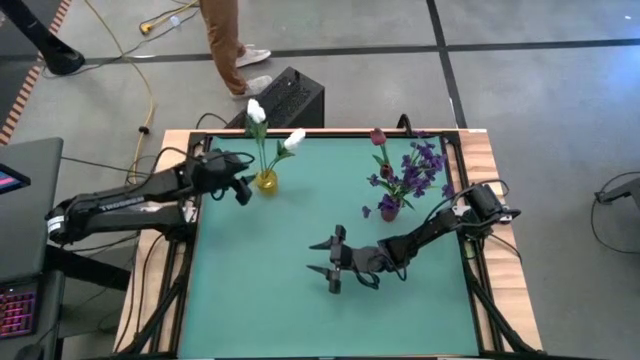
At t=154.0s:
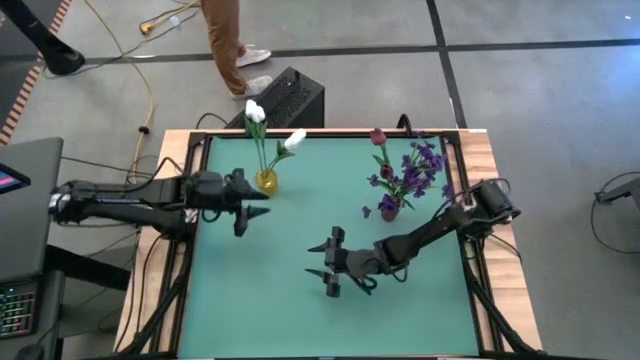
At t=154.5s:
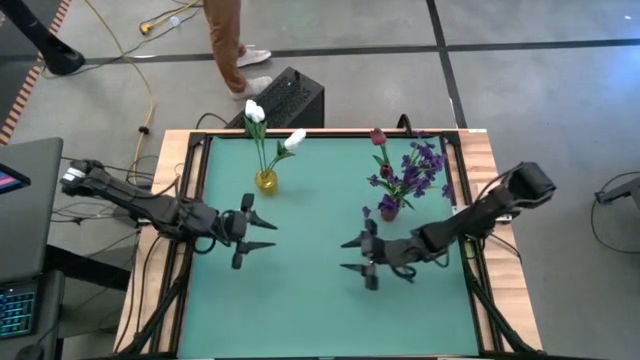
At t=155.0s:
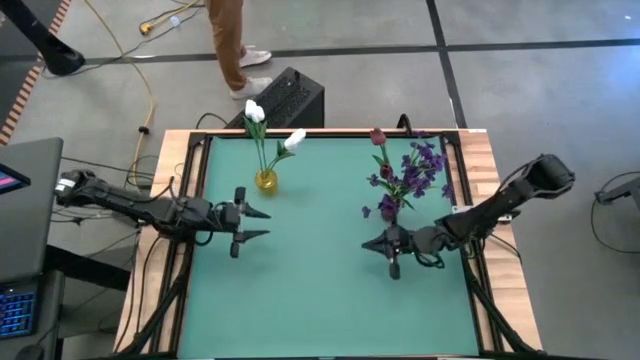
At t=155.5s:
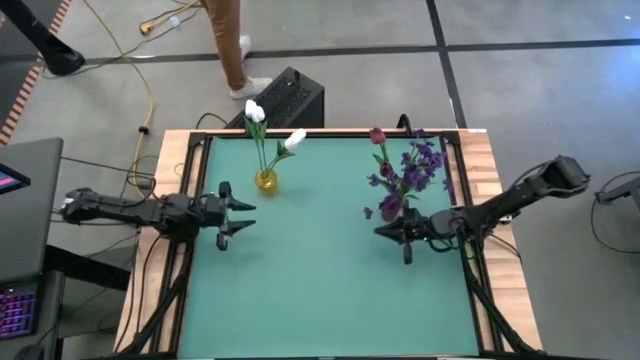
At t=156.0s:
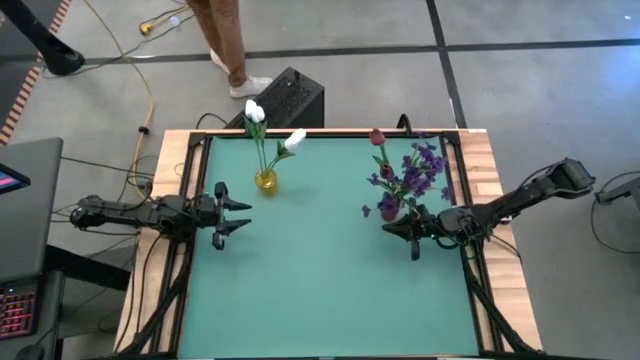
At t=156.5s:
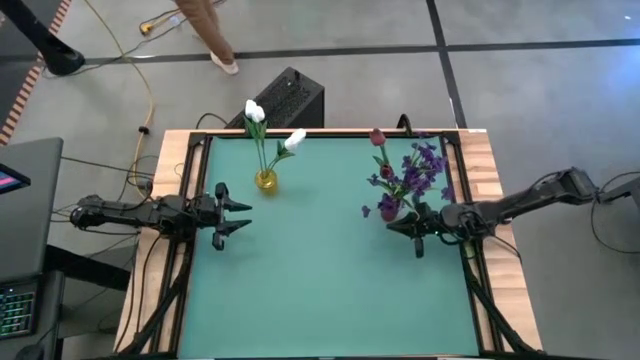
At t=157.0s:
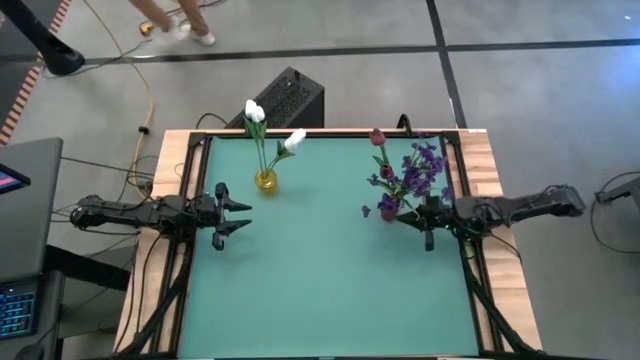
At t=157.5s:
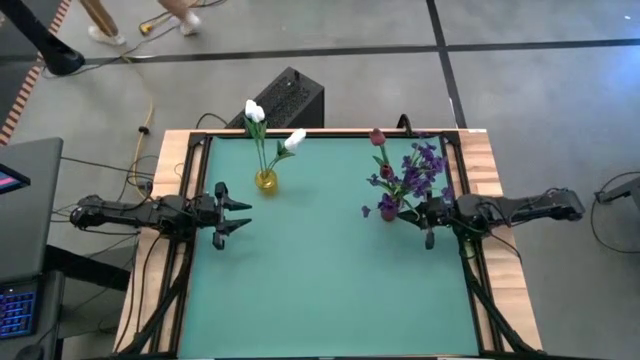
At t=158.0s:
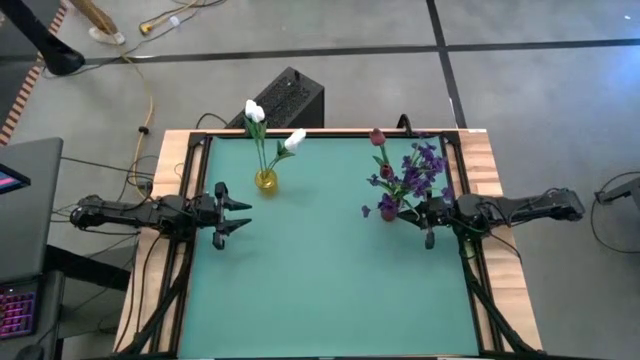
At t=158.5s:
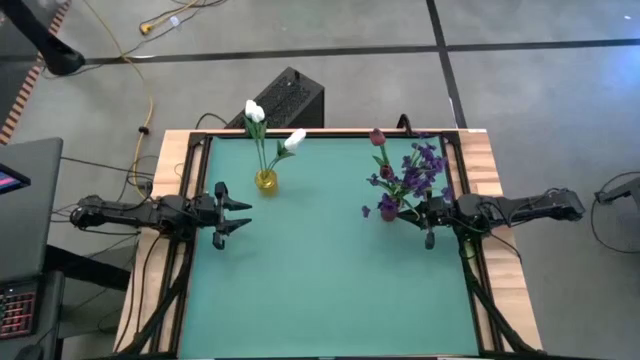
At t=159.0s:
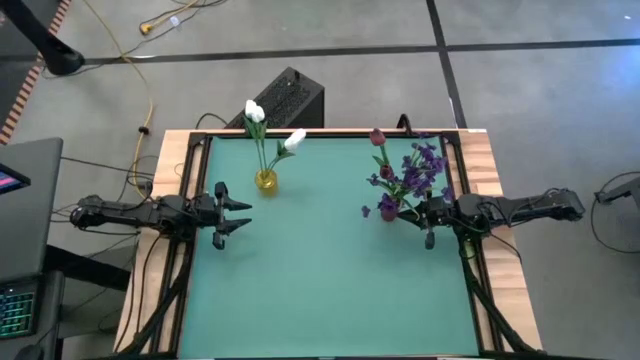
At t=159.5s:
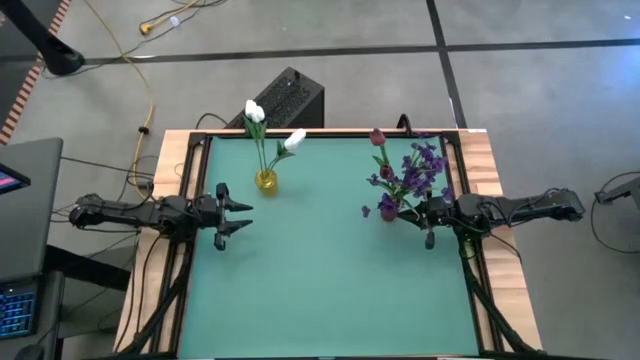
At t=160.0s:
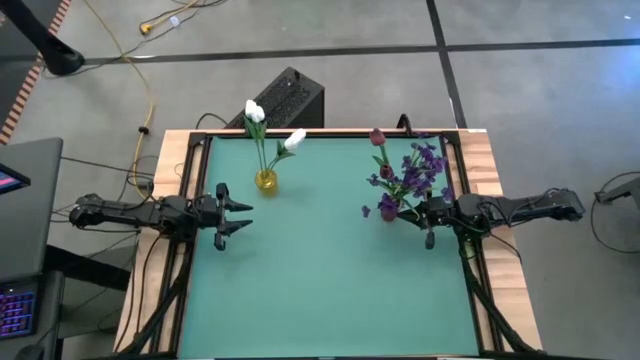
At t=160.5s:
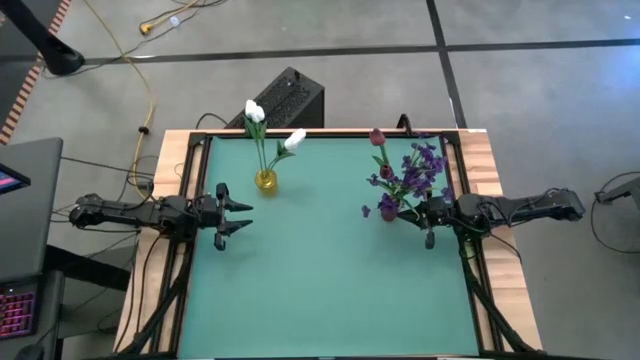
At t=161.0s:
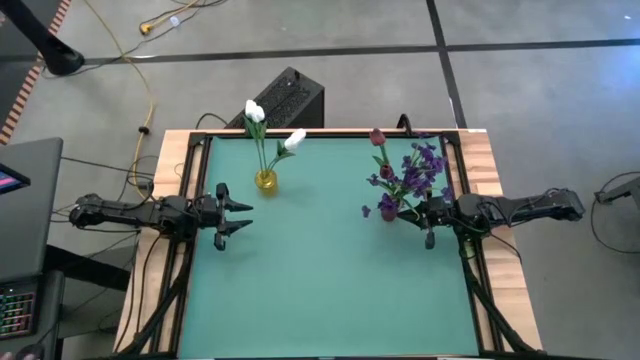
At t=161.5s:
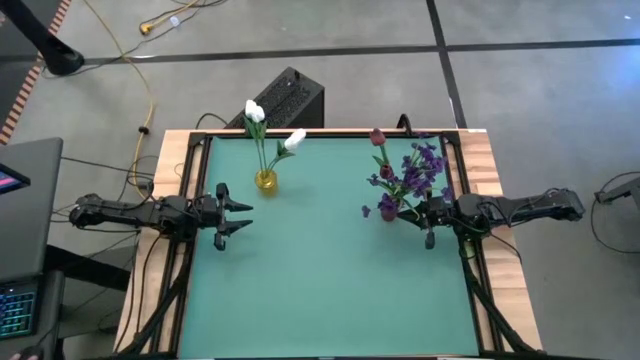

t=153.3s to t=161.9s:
Task: Sort flowers into vase by color
Return to Home Position

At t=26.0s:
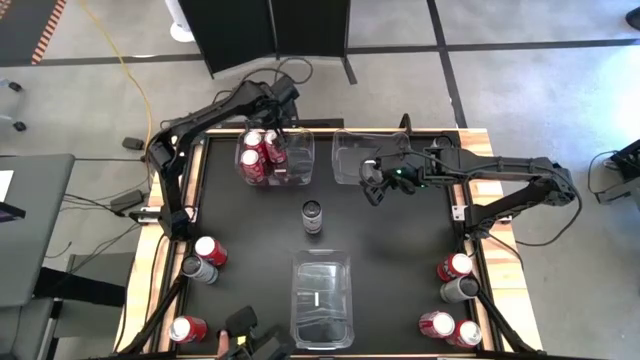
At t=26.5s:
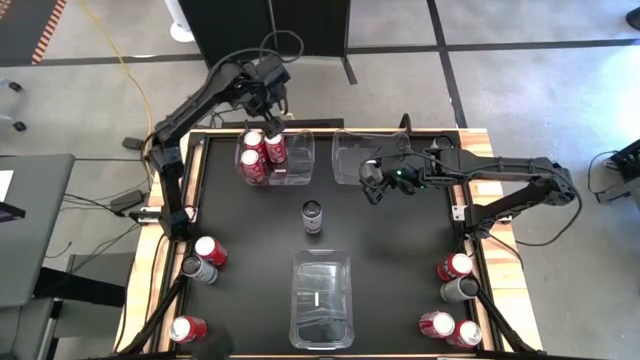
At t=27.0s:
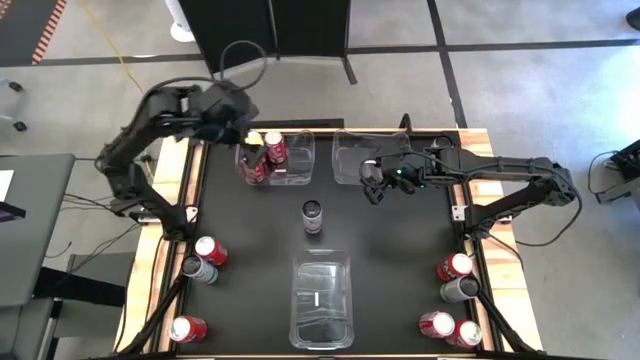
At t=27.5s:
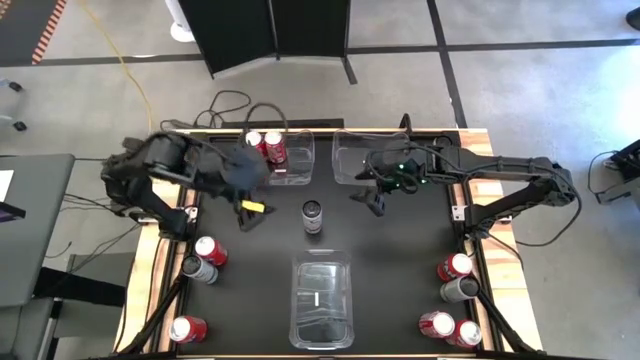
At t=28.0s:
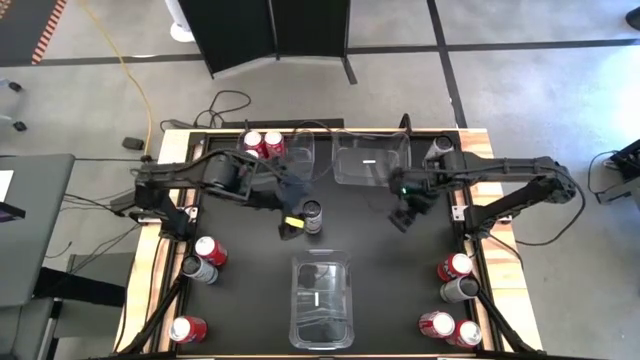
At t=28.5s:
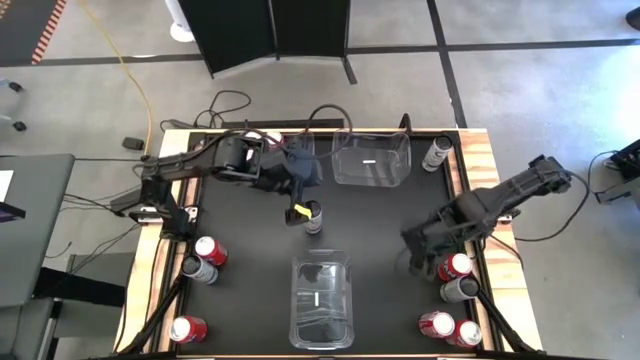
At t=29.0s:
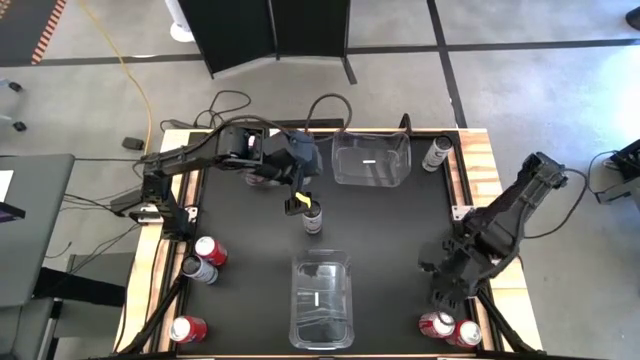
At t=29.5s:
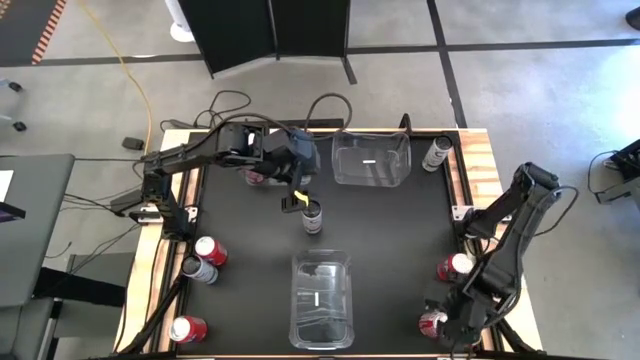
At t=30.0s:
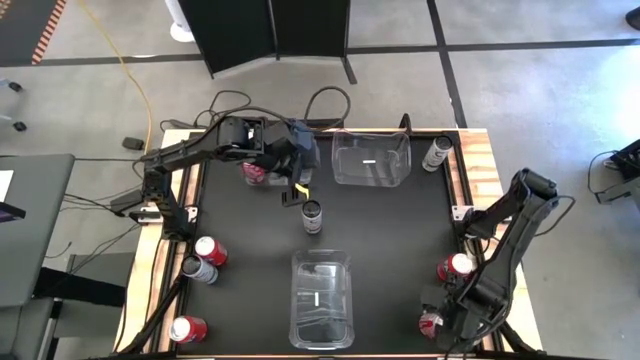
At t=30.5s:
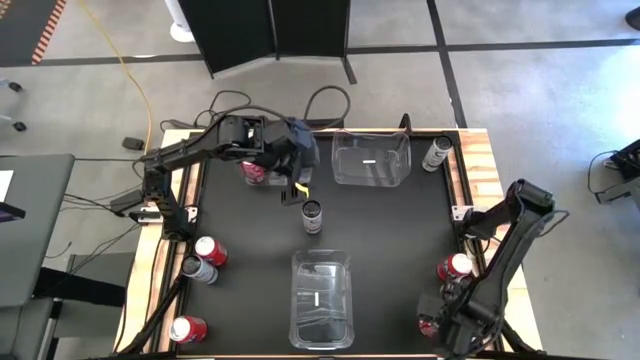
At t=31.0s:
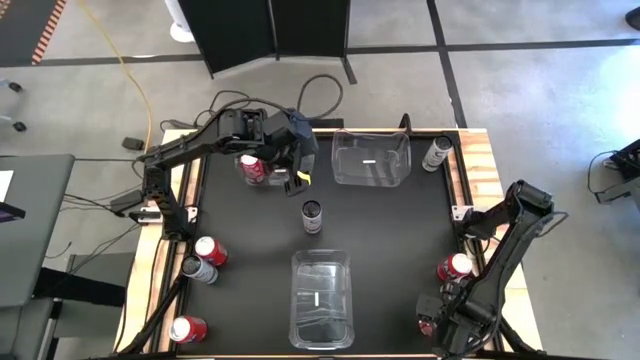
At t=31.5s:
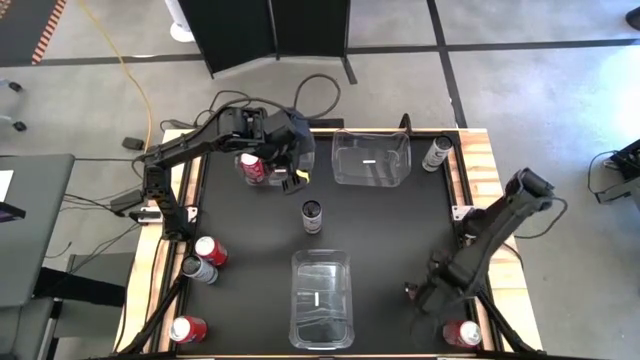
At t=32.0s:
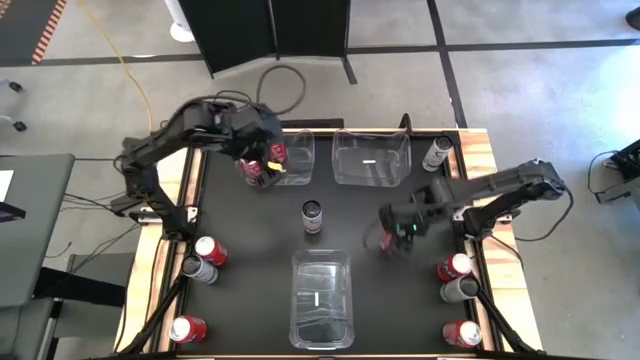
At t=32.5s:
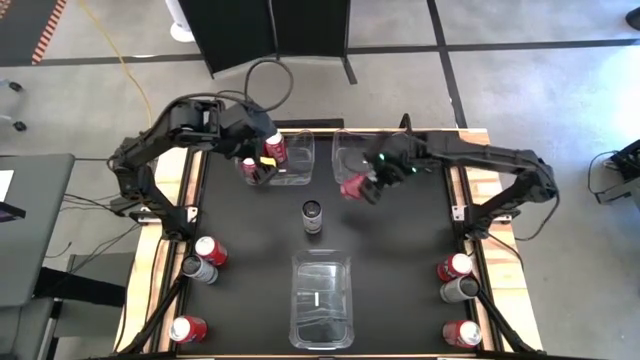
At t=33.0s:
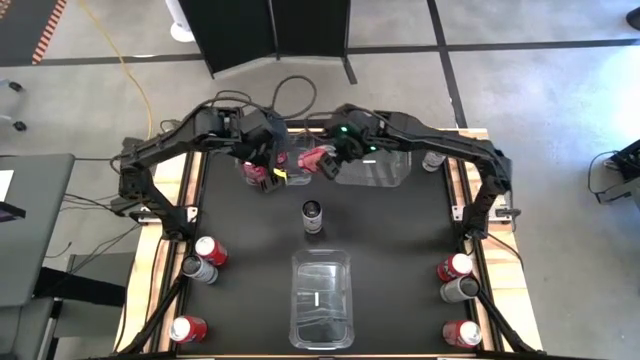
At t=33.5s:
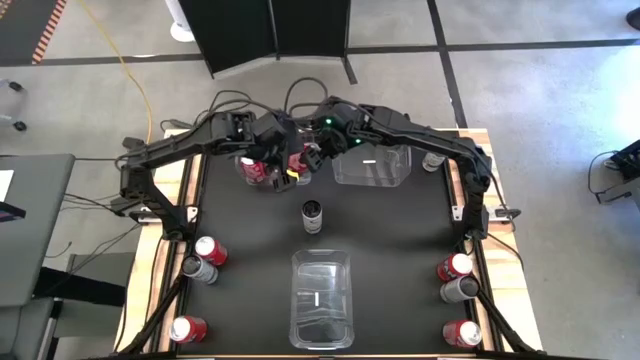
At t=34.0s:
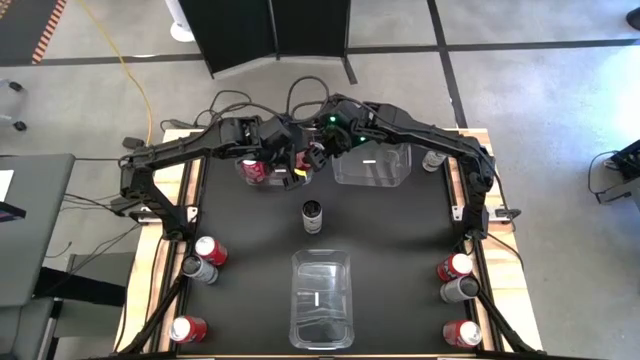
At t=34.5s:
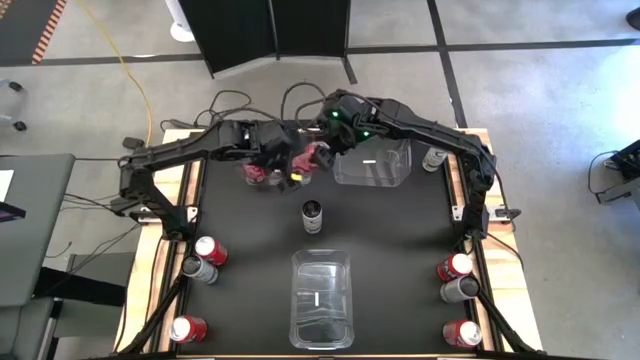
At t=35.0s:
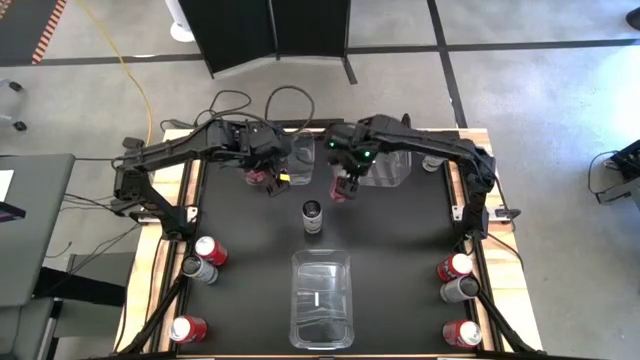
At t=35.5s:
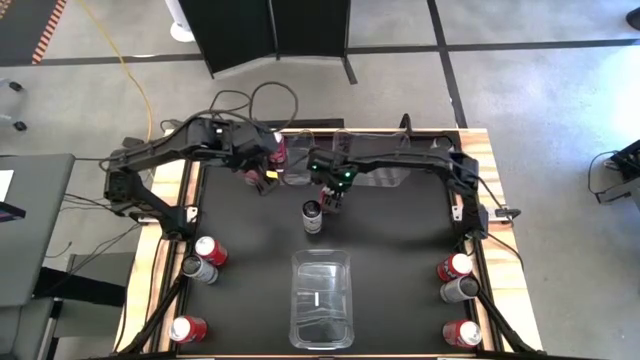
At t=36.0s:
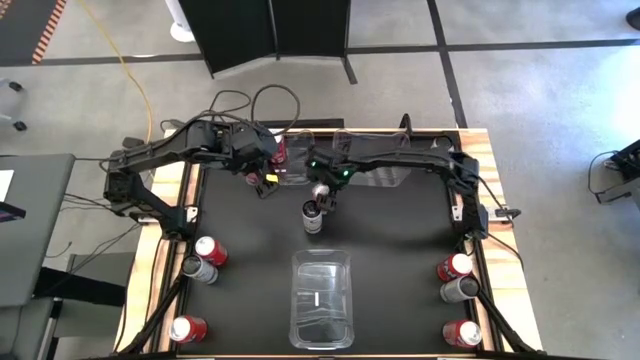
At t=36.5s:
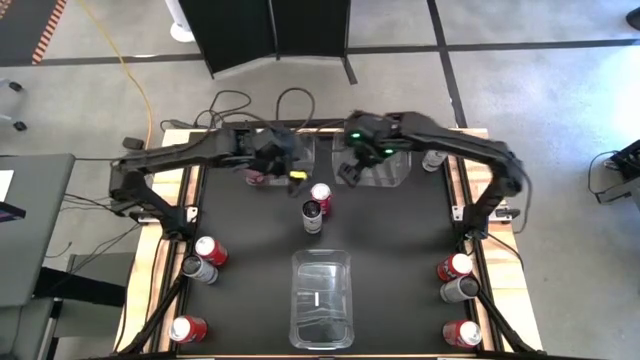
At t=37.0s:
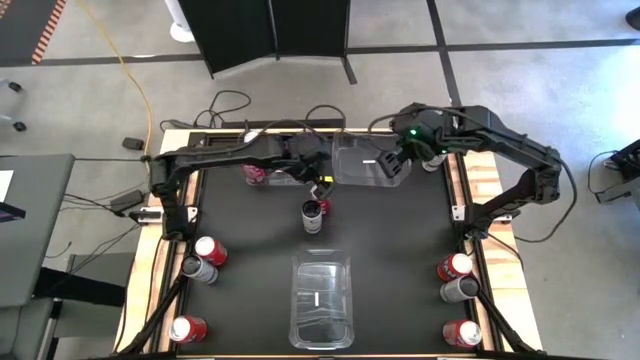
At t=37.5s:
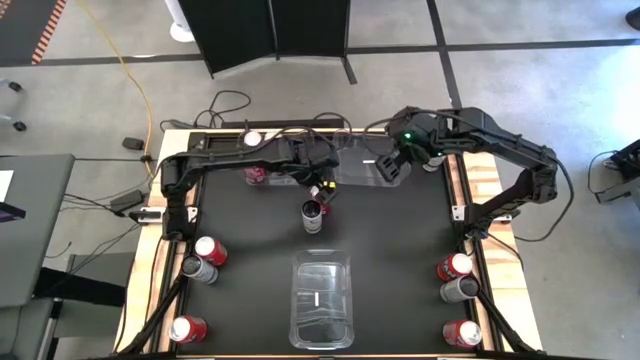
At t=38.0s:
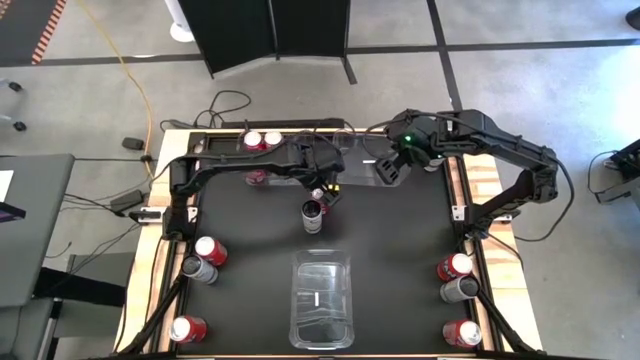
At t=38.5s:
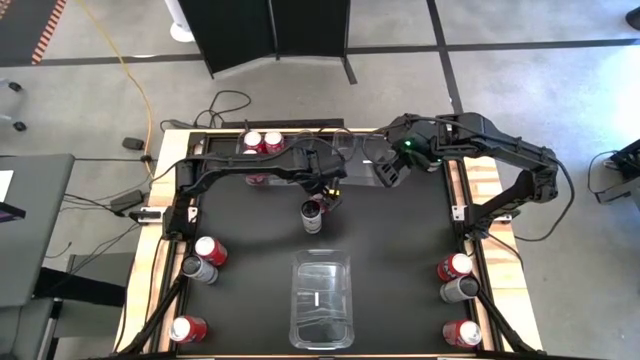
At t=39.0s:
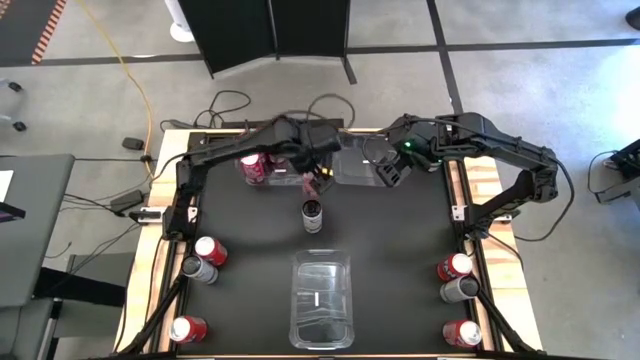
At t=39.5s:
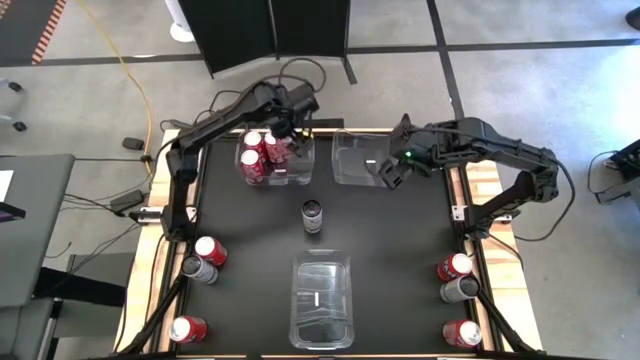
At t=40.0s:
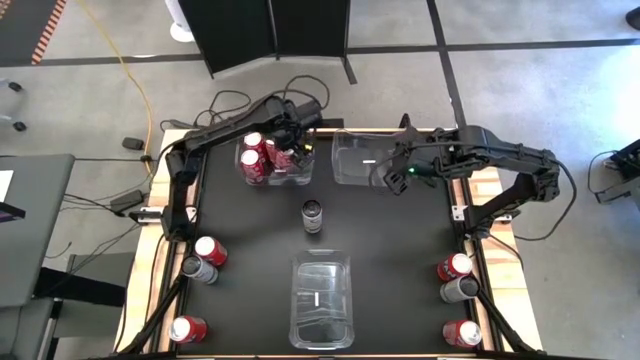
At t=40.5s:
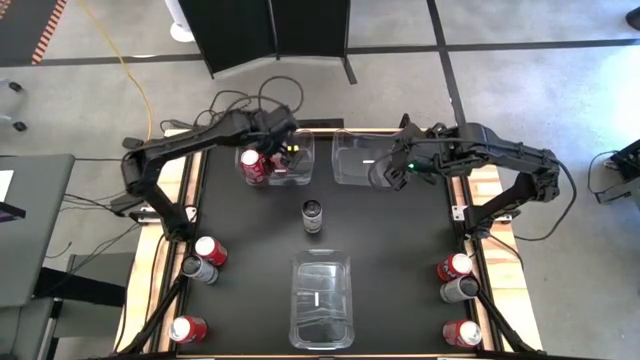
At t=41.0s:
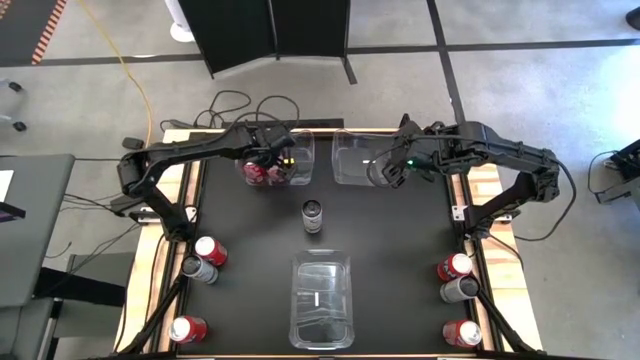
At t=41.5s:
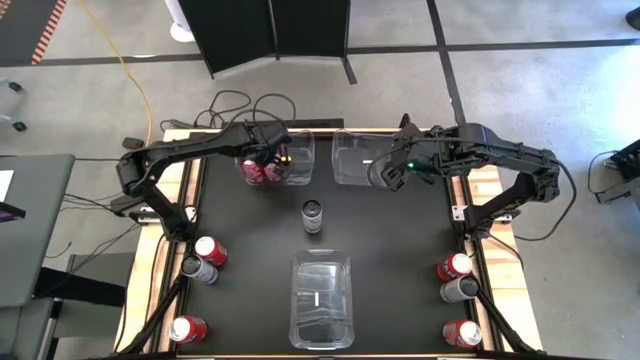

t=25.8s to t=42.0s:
Task: Sort soda cans
Put the red white soda can into the left transparent bin
